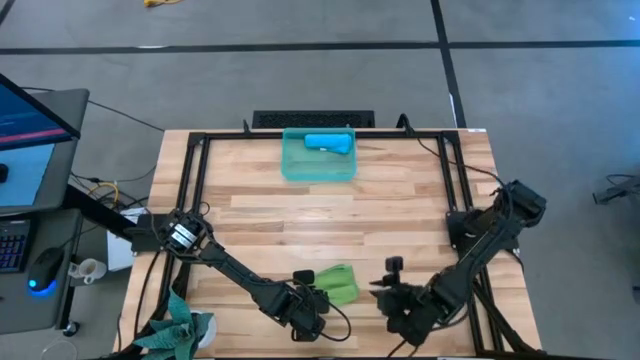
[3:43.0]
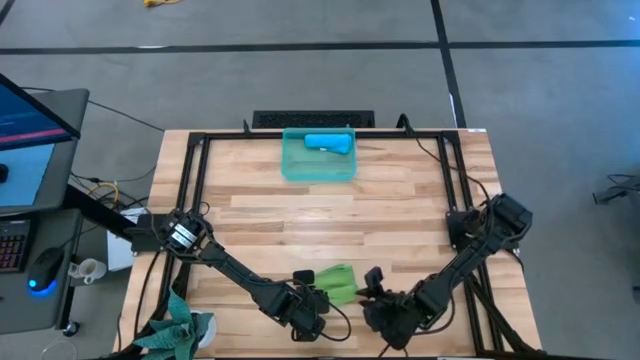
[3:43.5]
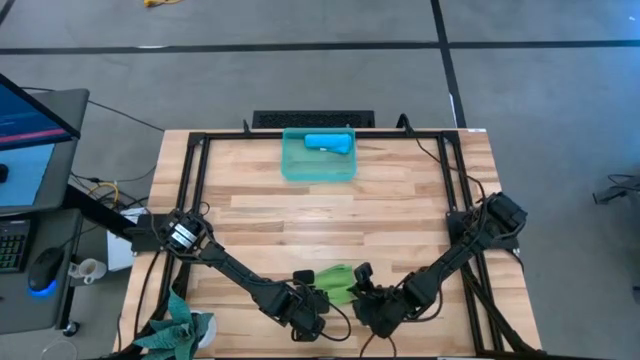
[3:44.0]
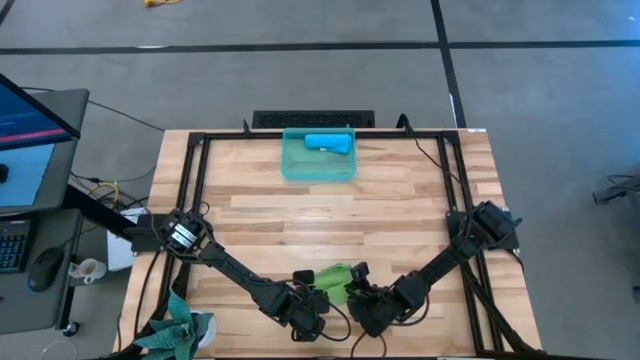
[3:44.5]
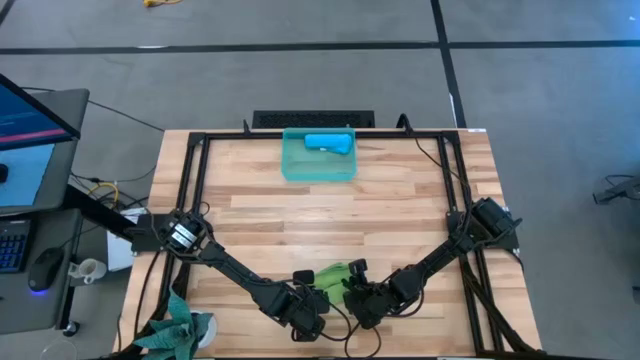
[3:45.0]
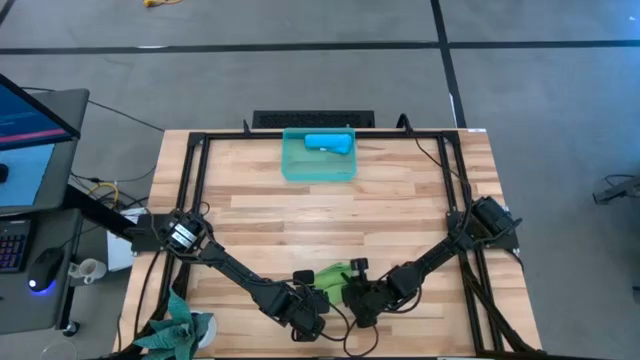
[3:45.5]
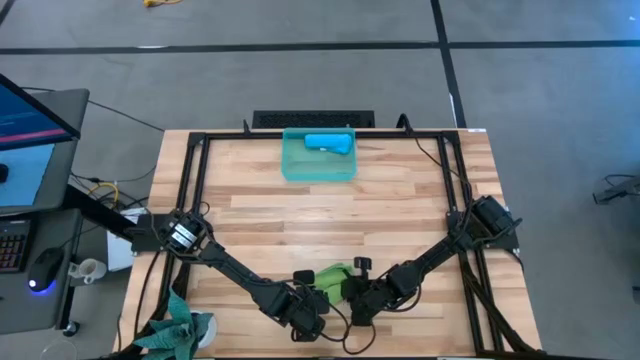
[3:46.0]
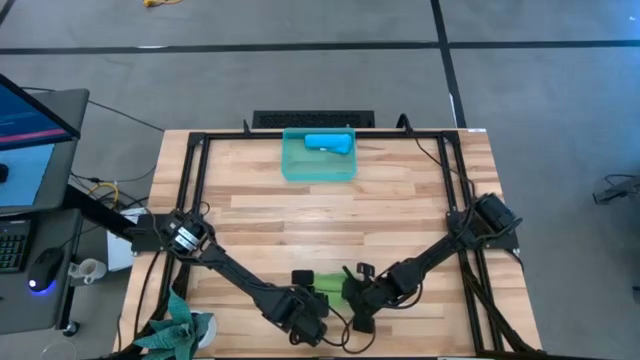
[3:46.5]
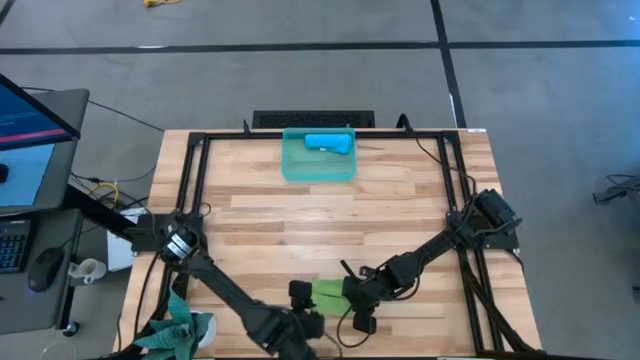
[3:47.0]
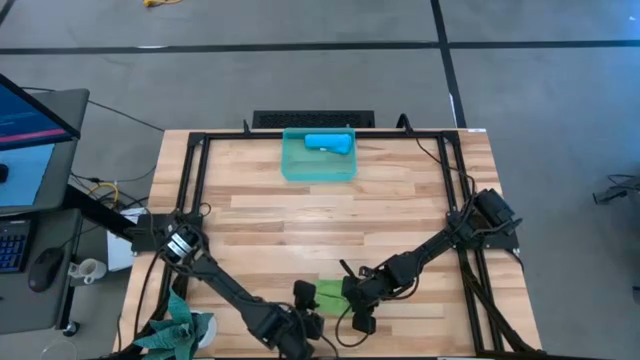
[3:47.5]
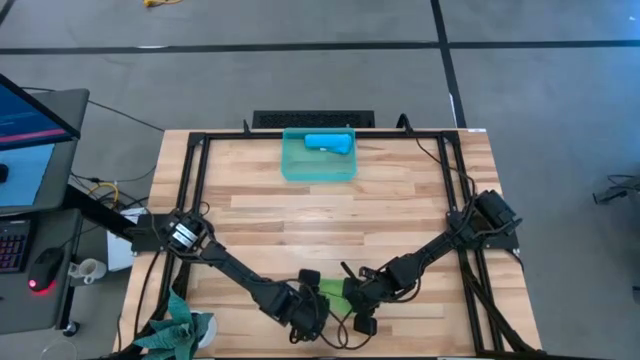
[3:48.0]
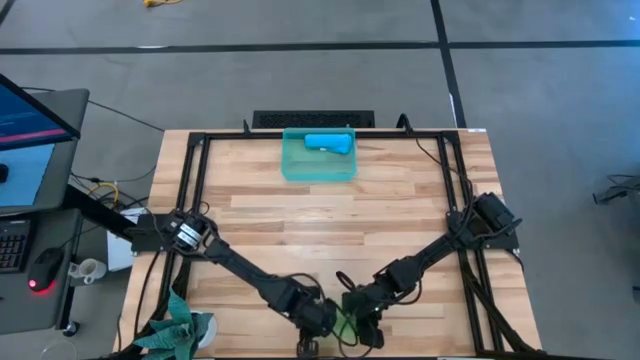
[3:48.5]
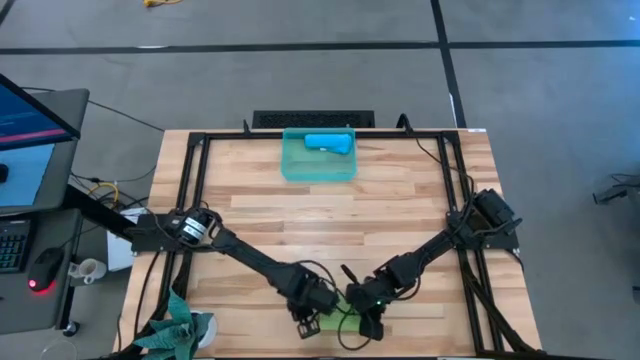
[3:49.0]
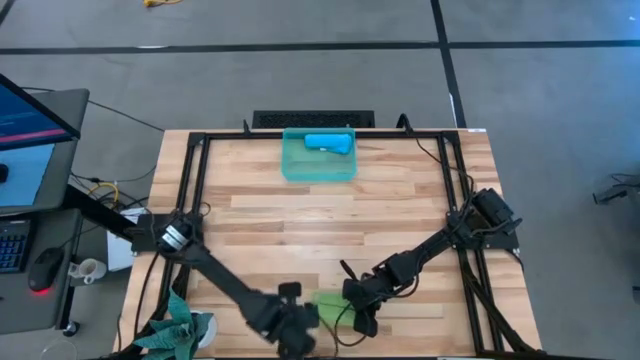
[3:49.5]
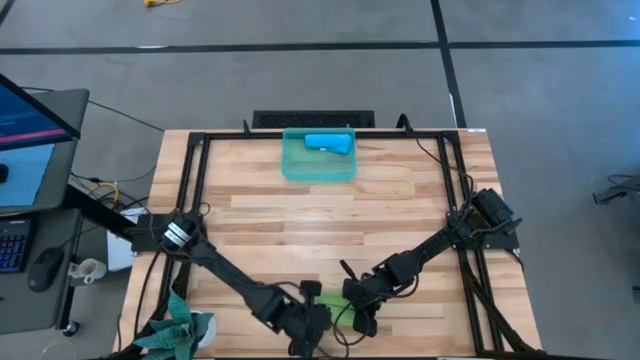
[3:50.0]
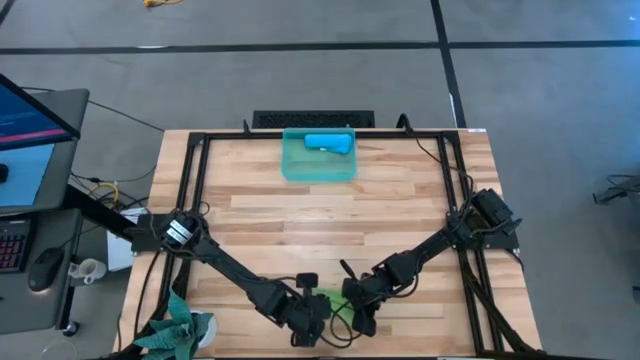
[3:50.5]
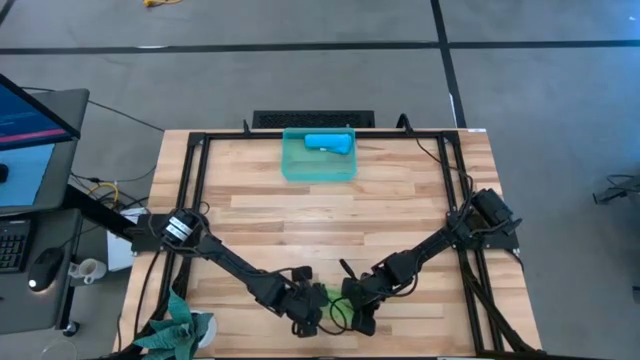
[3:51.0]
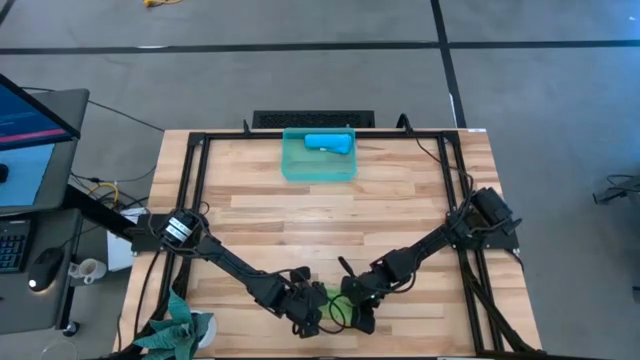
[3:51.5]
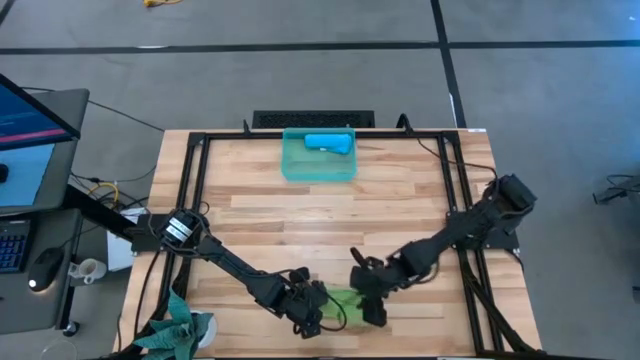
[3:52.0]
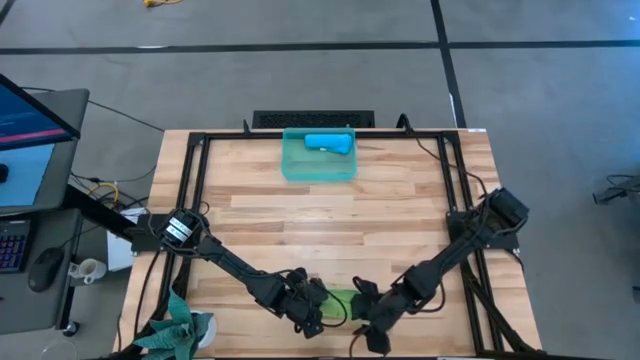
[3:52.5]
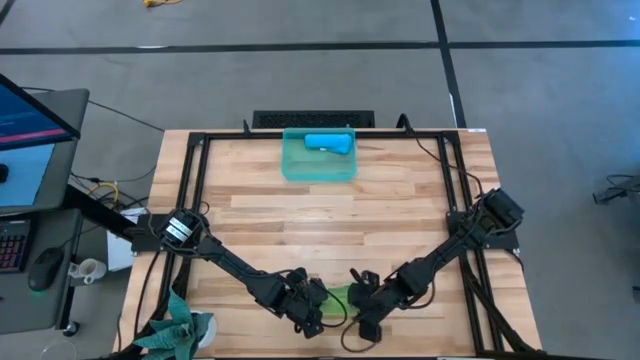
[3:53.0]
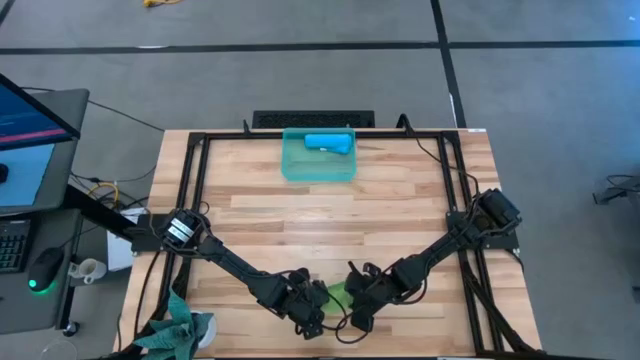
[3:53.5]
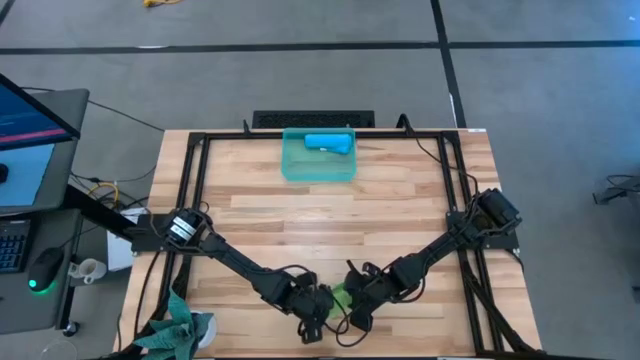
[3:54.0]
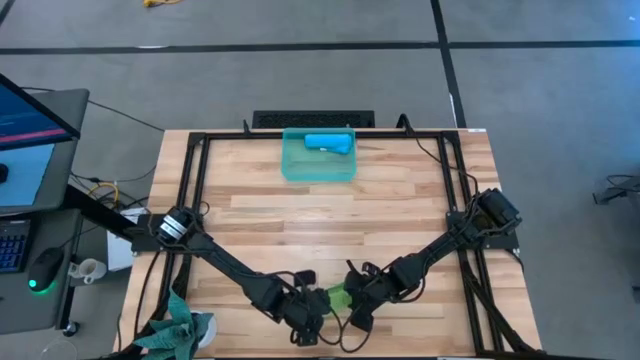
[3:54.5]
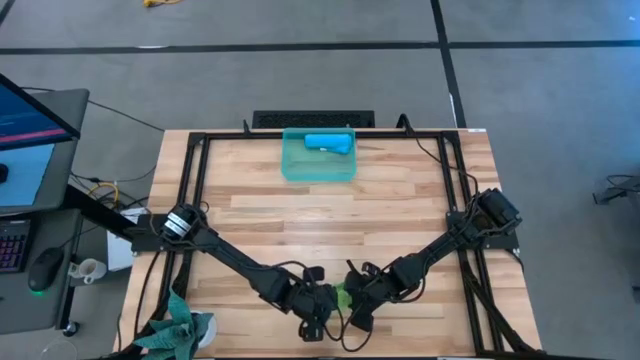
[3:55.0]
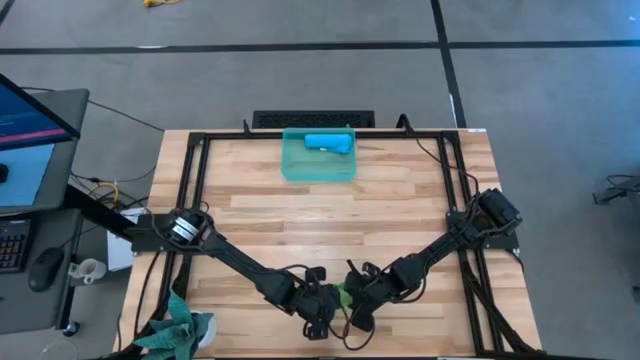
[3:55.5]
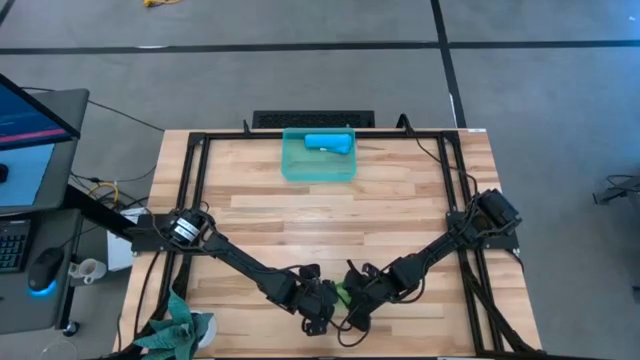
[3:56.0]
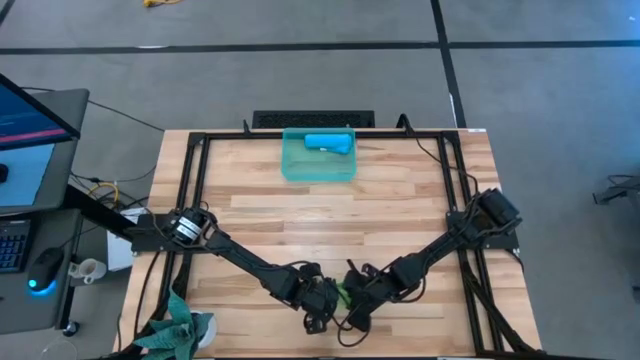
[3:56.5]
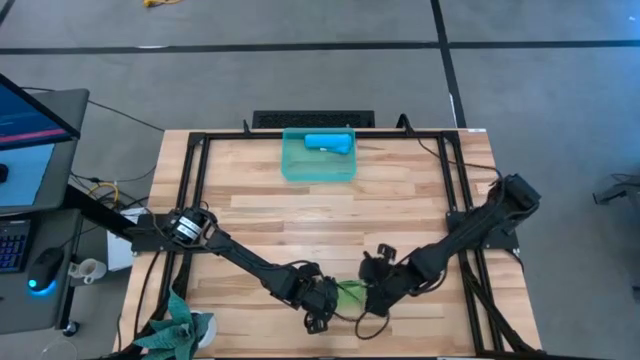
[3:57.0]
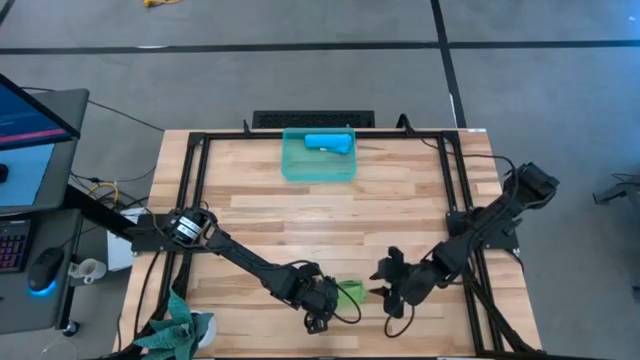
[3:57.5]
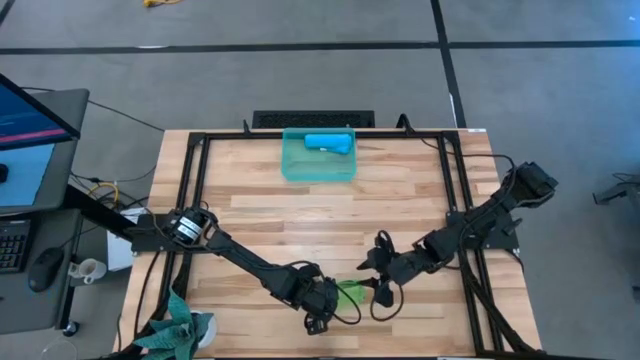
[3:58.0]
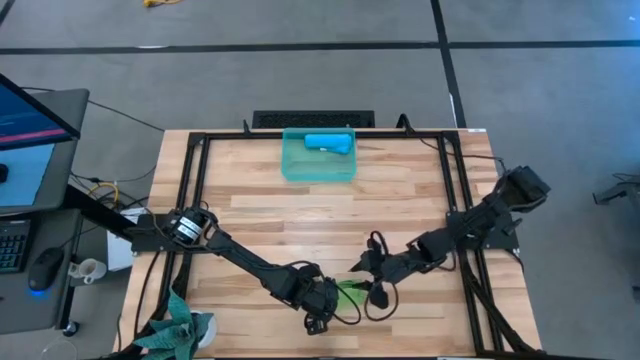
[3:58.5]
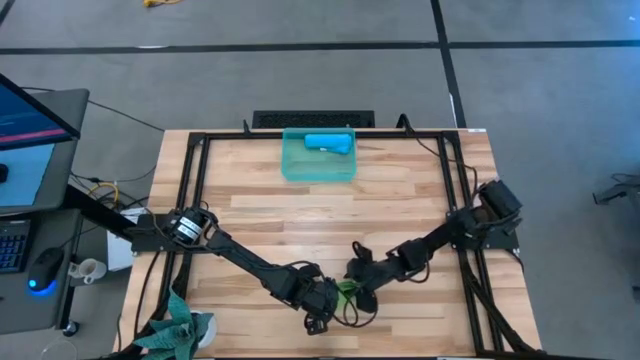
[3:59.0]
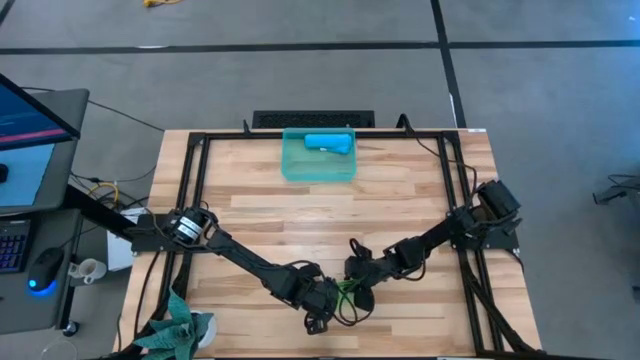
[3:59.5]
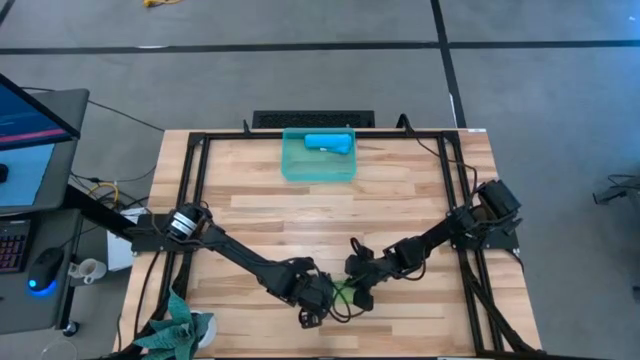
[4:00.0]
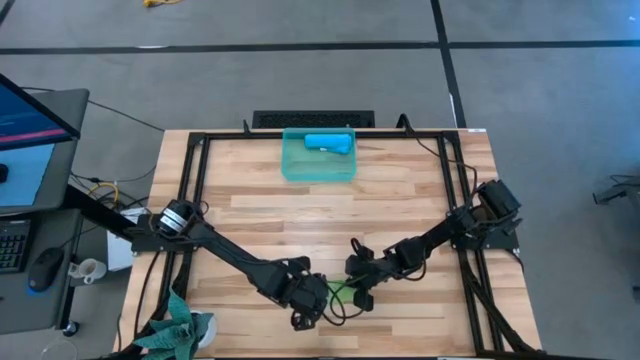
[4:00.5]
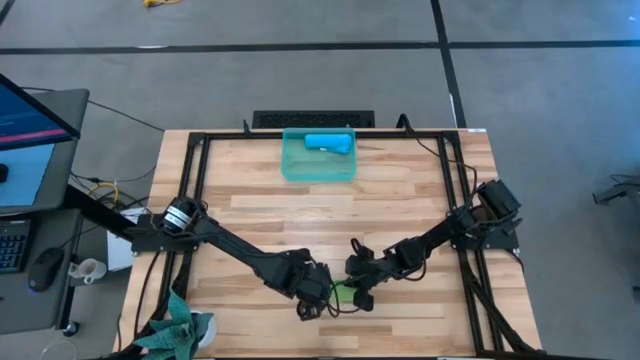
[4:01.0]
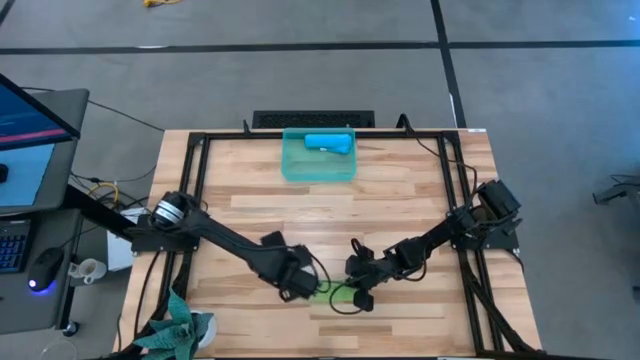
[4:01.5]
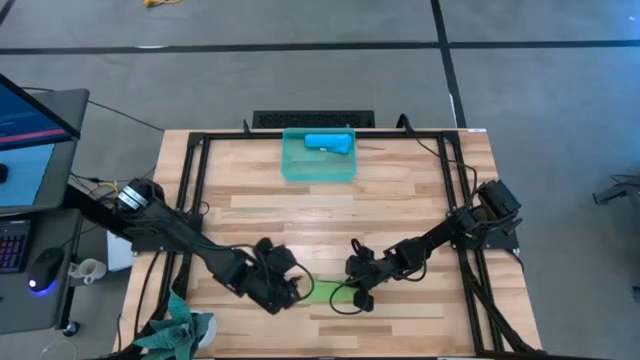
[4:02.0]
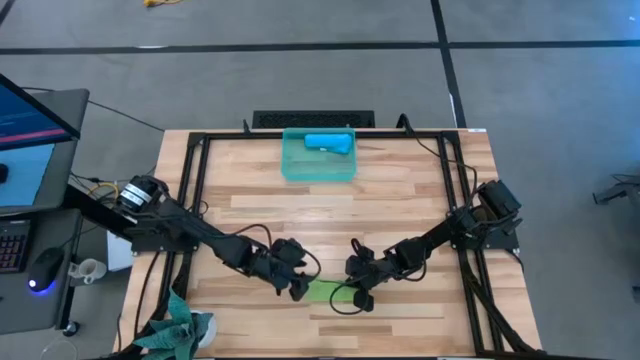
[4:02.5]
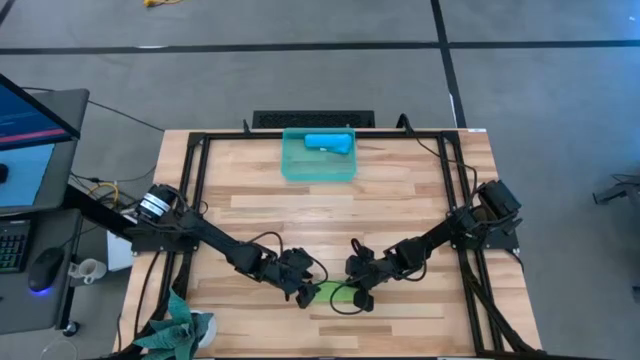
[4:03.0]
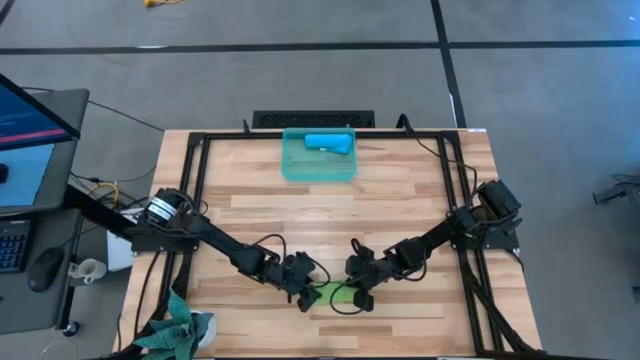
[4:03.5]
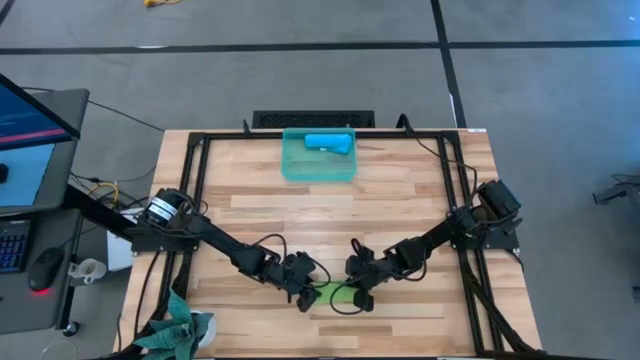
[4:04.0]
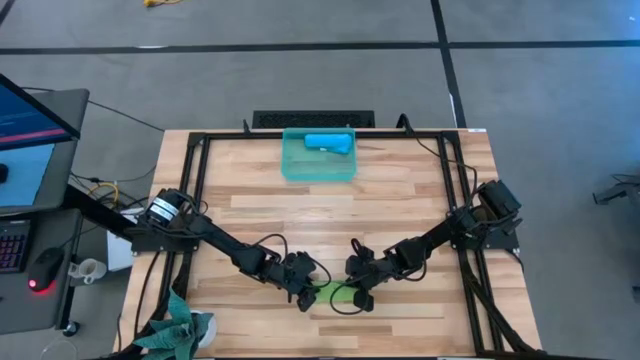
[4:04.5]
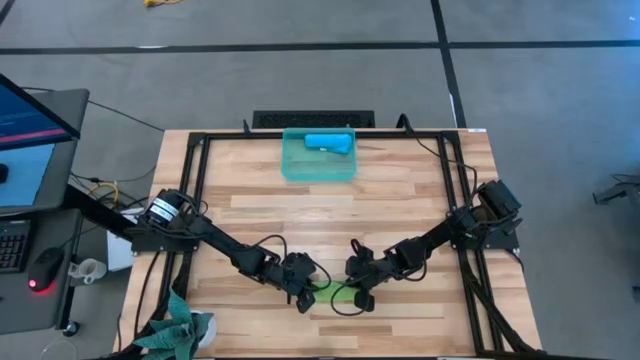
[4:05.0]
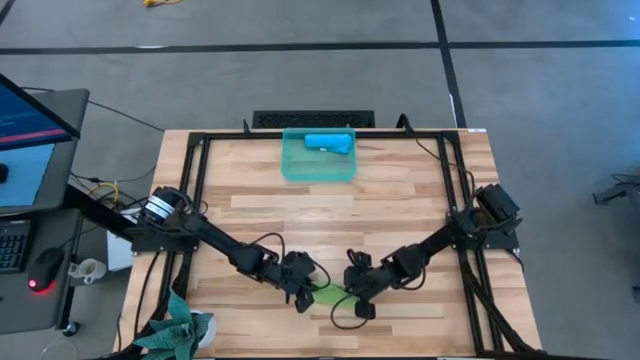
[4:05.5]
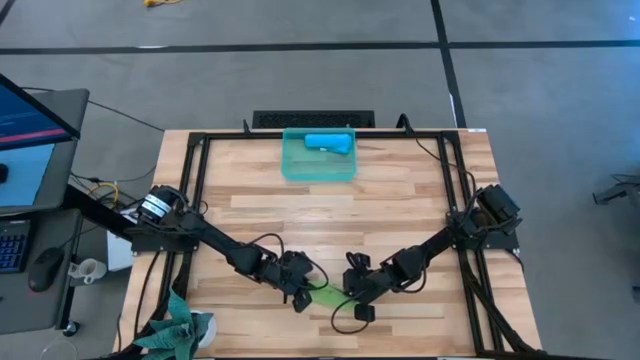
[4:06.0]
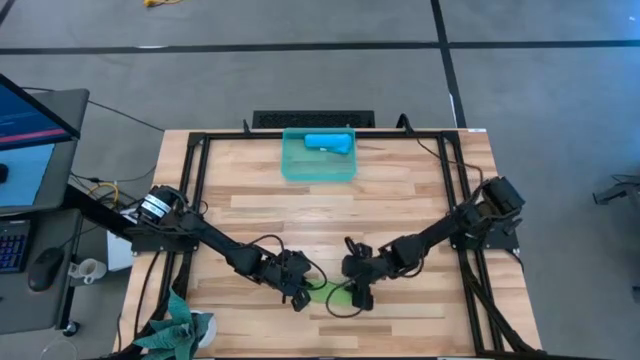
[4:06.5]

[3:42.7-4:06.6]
Task: Roll microfiber towels into tight, uniform cylinder then place into a basket
Roll the green microfiber cloth
